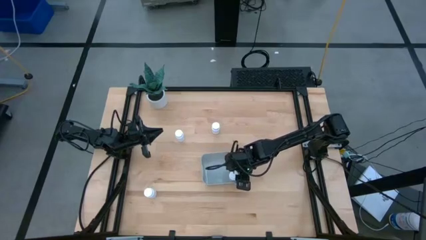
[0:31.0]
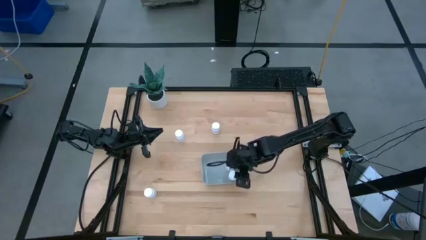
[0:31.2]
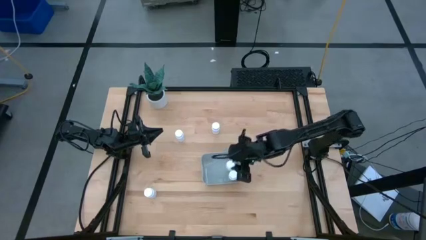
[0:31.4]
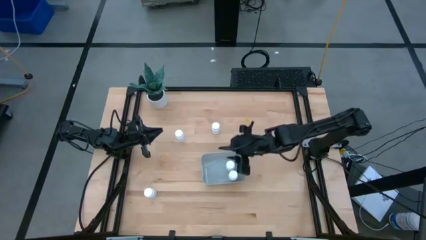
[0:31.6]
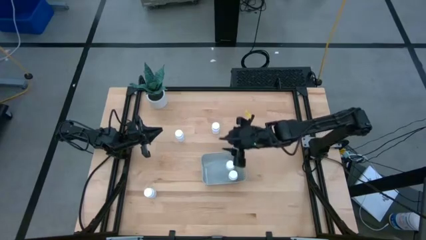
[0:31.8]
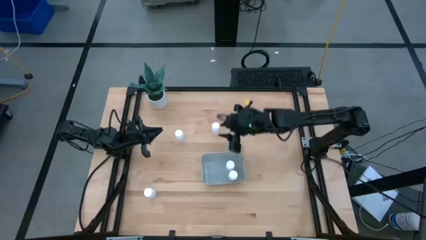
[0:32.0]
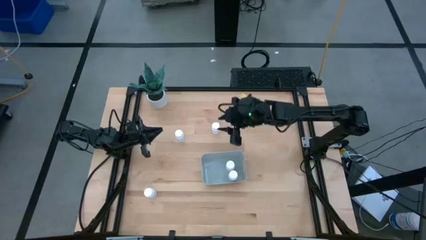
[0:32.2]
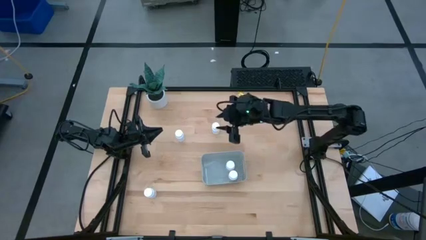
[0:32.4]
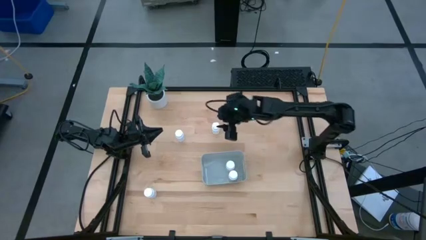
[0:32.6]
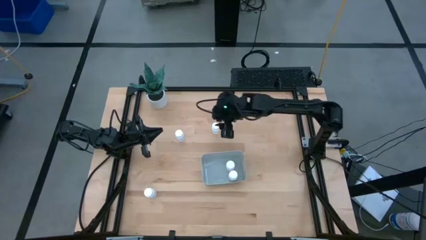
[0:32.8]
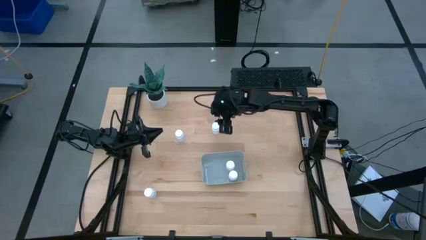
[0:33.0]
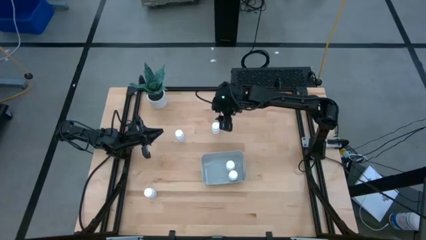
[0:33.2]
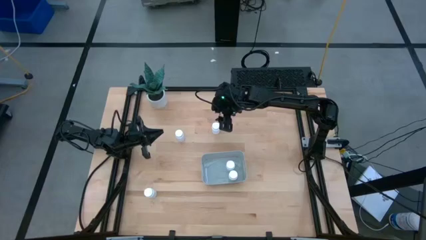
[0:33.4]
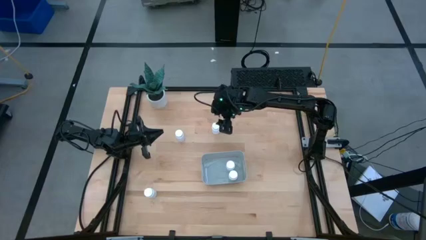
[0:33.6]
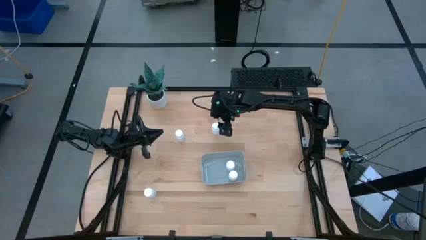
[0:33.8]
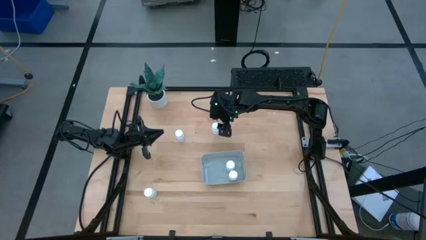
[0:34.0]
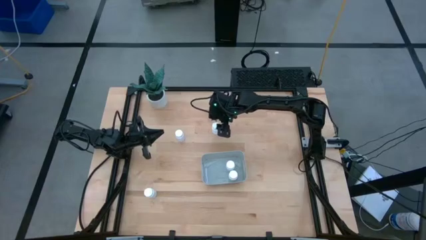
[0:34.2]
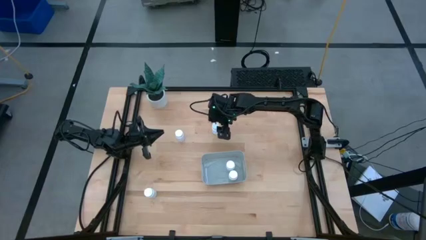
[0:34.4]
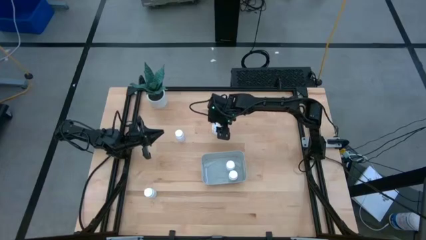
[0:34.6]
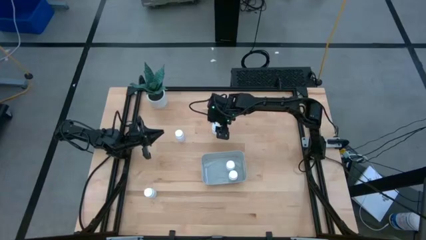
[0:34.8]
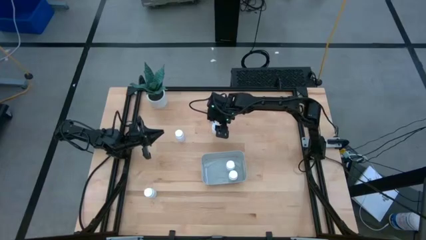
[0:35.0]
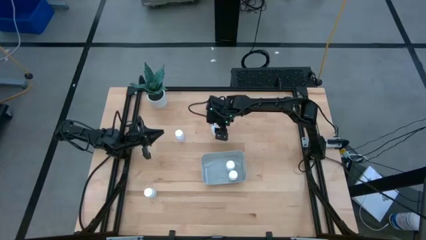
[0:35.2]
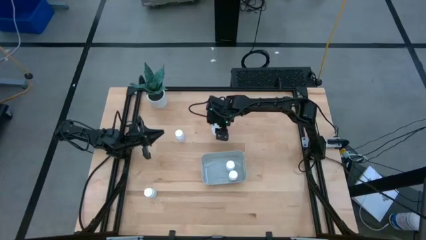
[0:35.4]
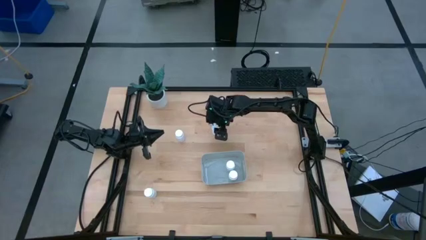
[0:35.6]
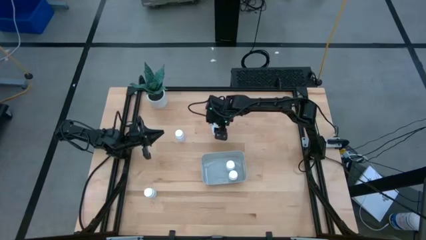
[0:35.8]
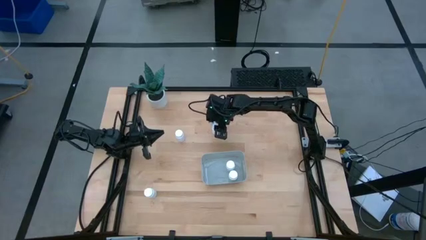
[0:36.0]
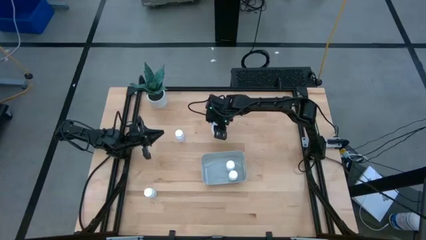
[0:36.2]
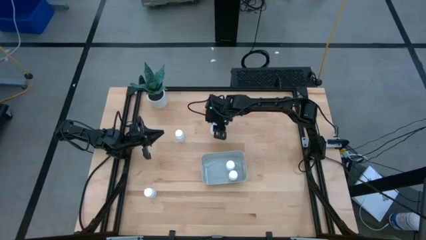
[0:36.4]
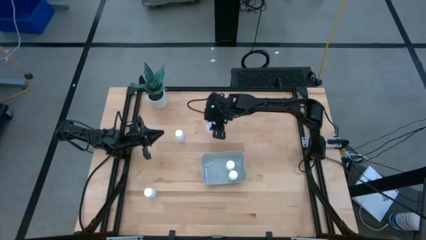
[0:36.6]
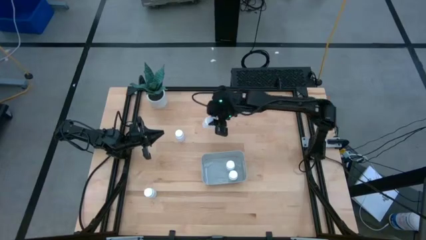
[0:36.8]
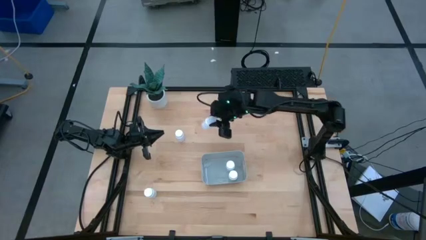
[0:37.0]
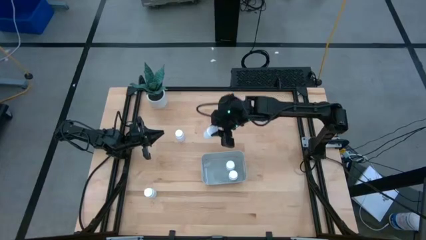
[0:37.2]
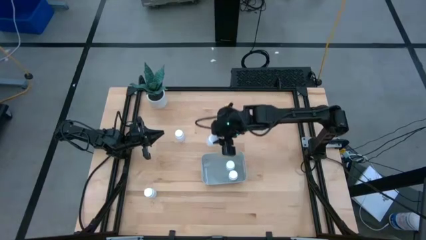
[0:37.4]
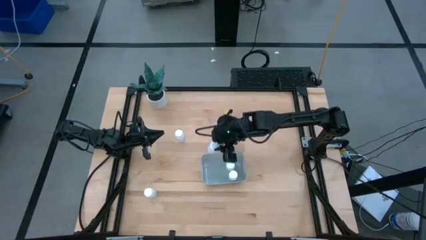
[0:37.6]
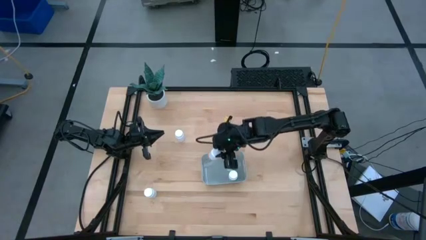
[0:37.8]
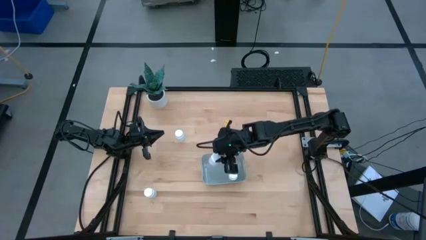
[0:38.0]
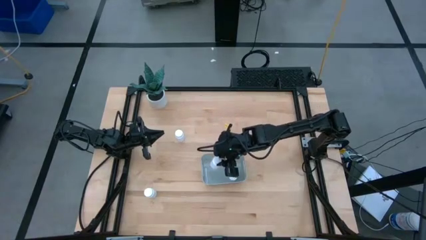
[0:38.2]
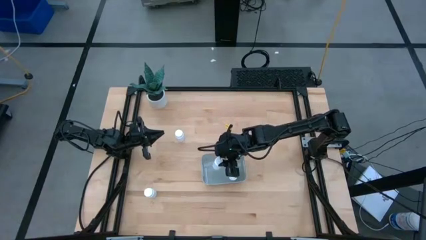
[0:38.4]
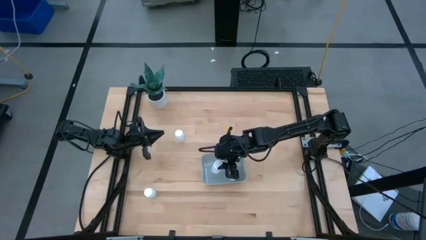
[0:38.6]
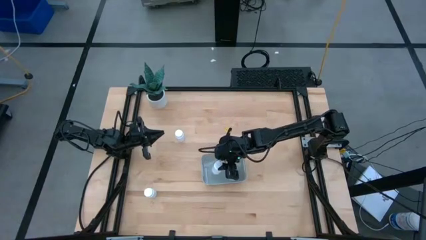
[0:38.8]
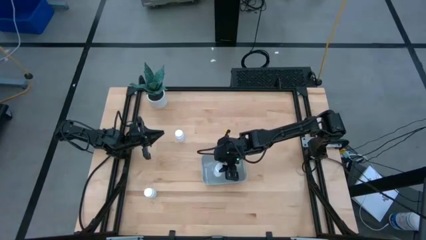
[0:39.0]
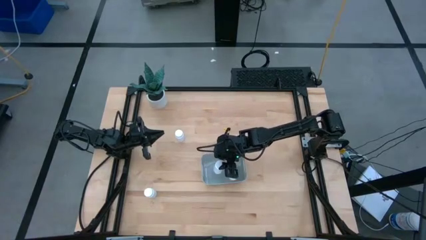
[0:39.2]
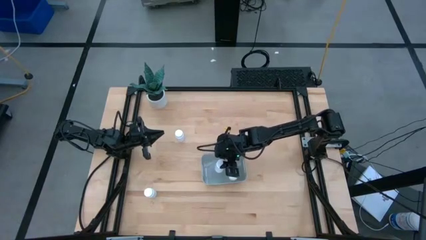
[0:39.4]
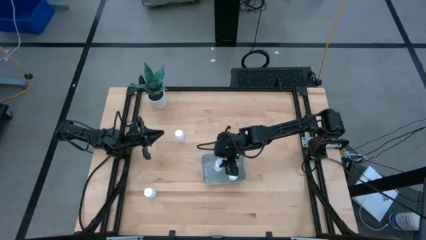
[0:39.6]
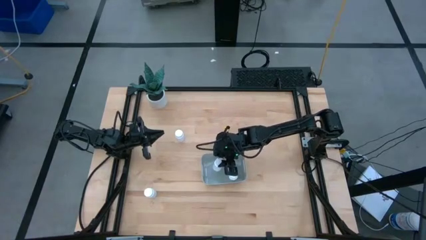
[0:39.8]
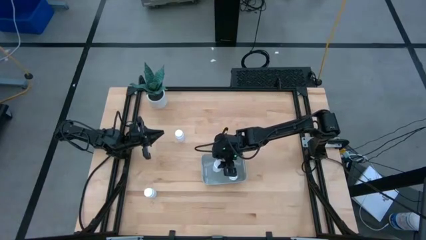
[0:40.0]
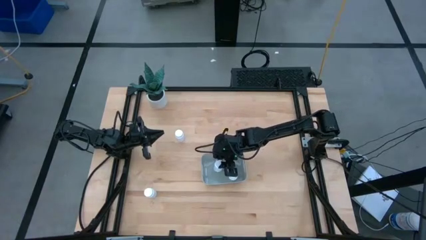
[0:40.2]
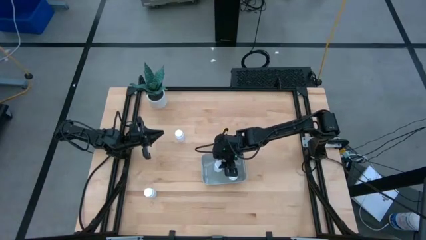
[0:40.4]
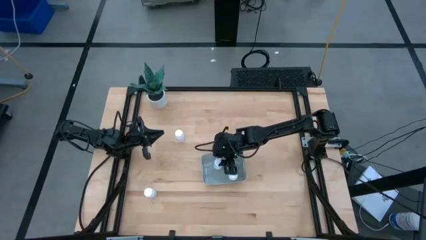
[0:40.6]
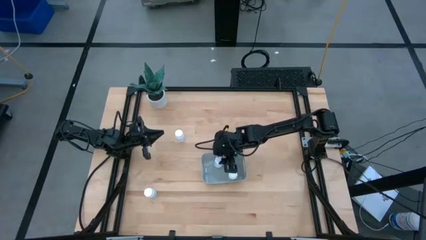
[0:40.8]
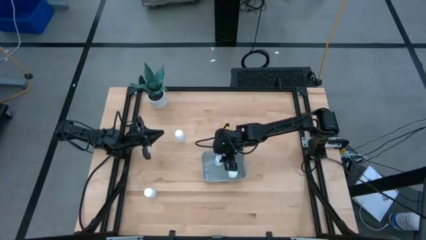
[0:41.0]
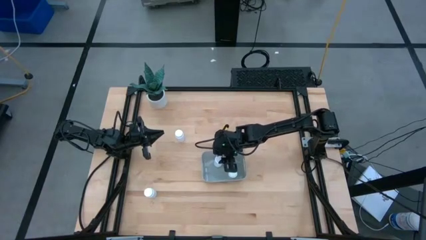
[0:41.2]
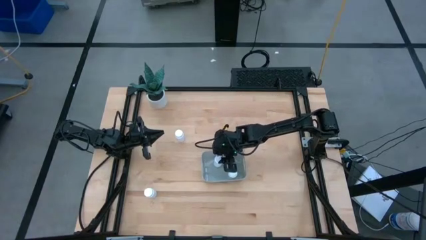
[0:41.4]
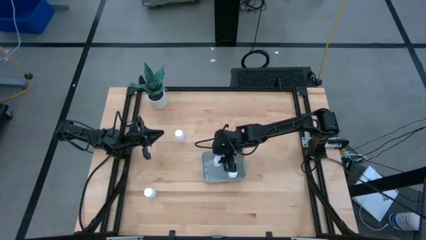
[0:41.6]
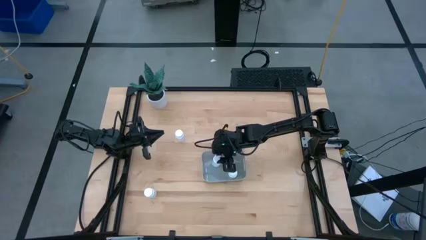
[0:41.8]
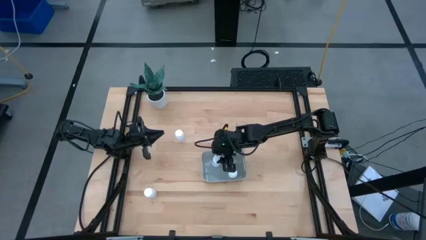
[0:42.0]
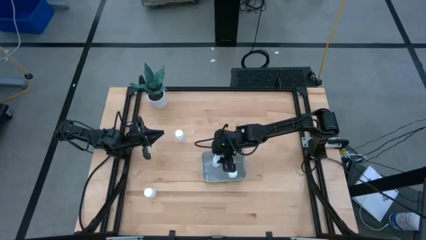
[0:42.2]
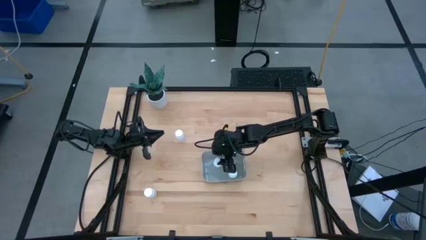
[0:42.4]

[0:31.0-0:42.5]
Task: Pick and place pill bottles into a basket
Put the white pill bottle into the gray bin

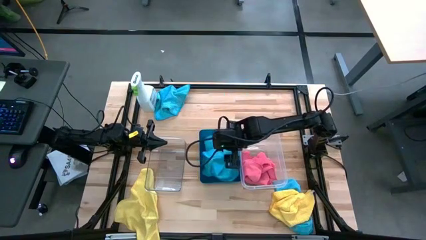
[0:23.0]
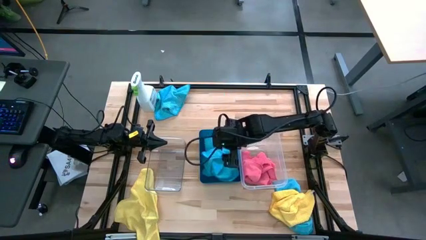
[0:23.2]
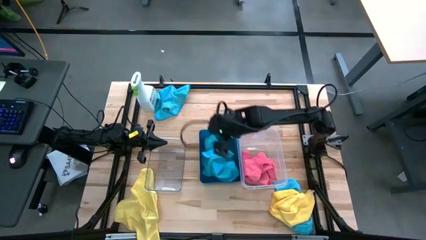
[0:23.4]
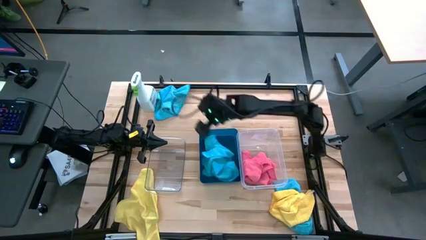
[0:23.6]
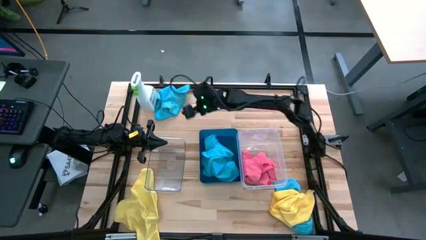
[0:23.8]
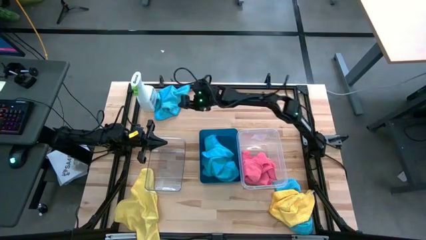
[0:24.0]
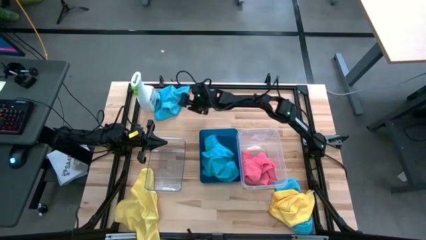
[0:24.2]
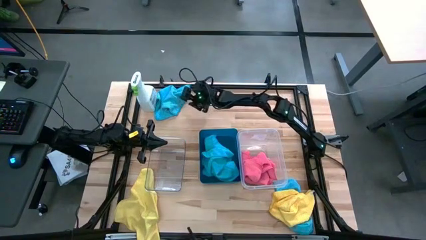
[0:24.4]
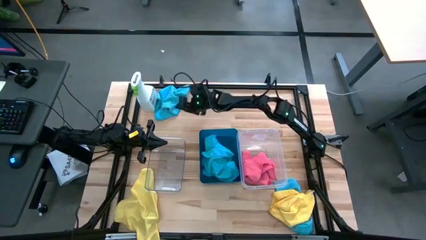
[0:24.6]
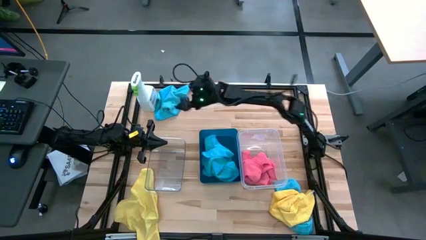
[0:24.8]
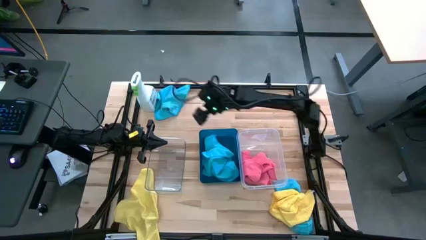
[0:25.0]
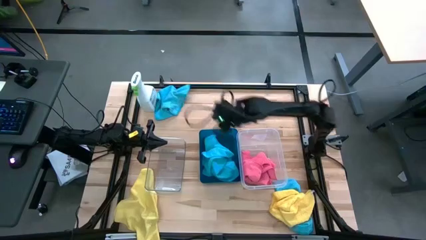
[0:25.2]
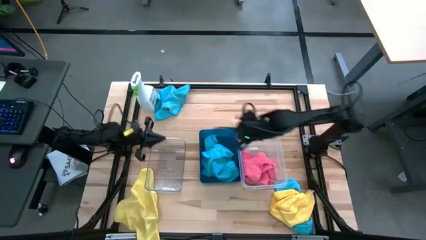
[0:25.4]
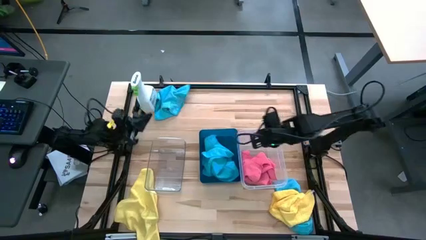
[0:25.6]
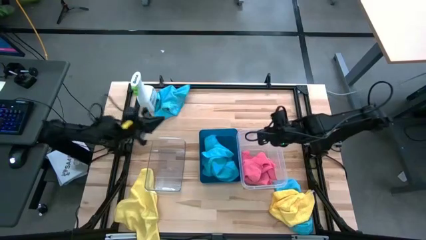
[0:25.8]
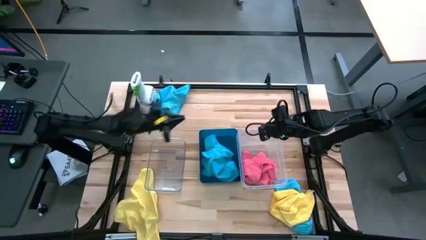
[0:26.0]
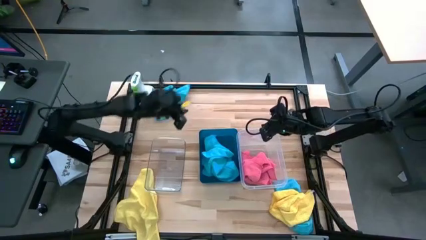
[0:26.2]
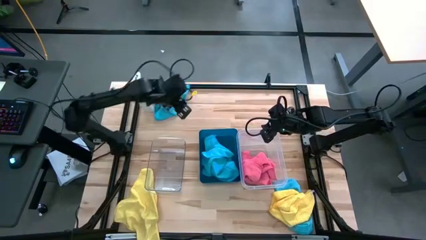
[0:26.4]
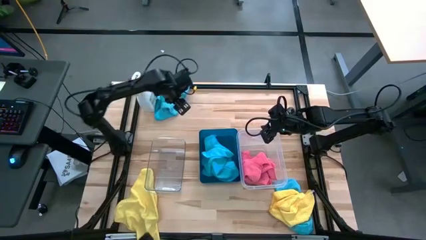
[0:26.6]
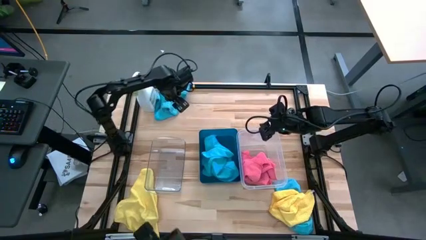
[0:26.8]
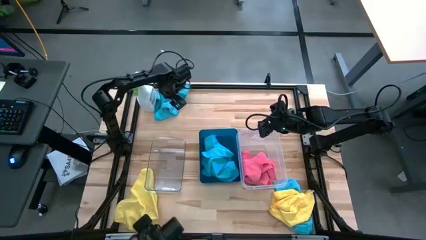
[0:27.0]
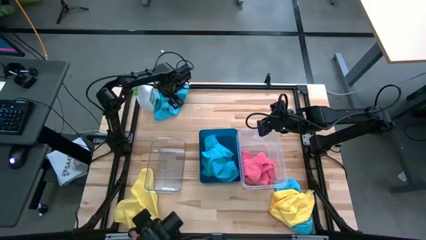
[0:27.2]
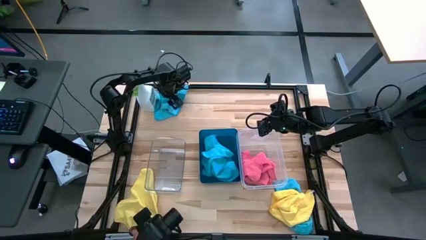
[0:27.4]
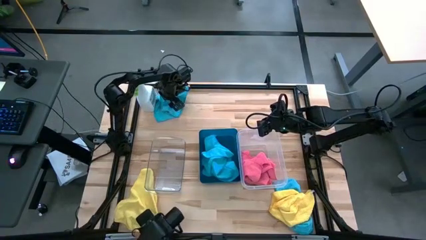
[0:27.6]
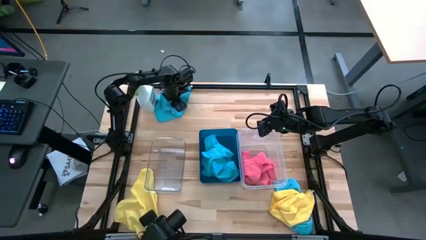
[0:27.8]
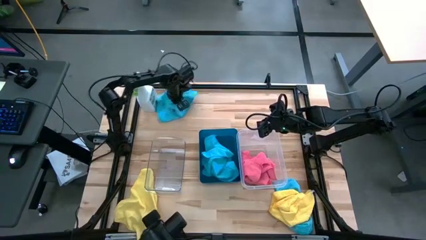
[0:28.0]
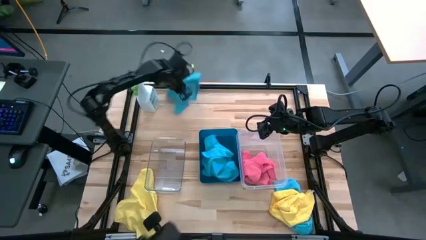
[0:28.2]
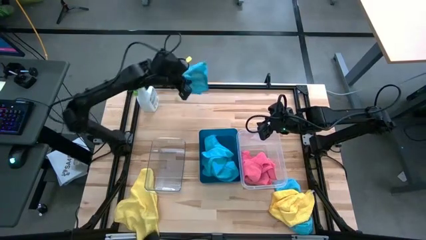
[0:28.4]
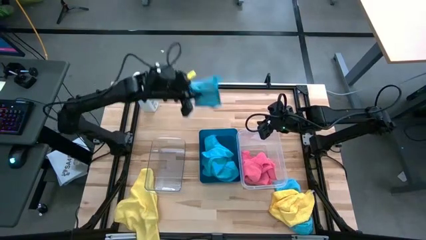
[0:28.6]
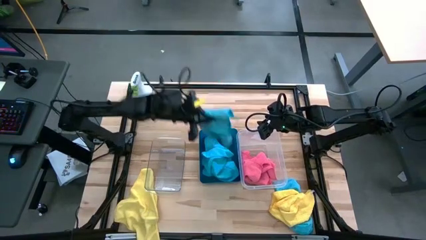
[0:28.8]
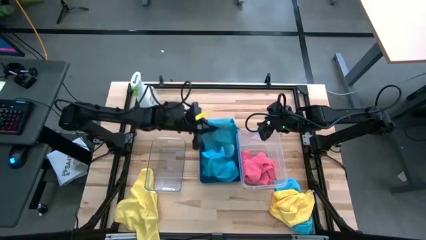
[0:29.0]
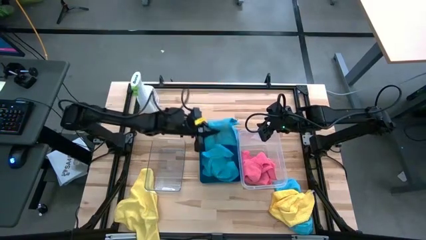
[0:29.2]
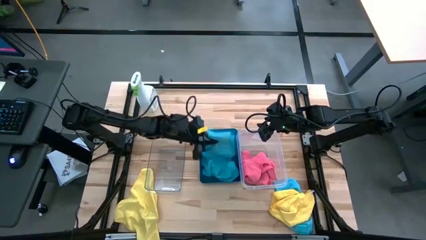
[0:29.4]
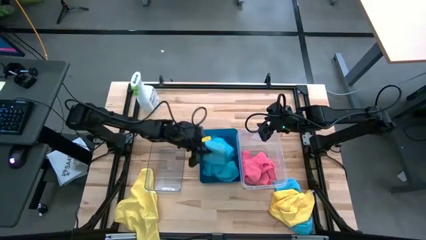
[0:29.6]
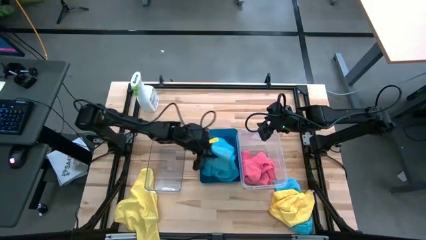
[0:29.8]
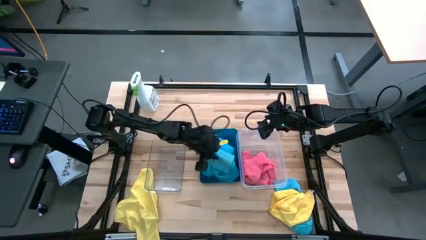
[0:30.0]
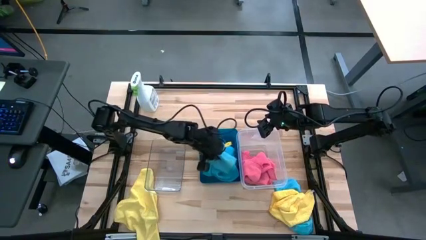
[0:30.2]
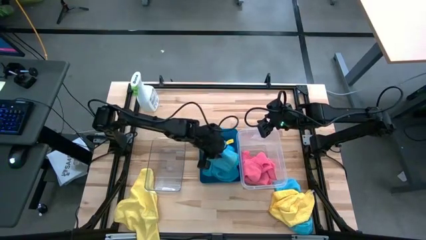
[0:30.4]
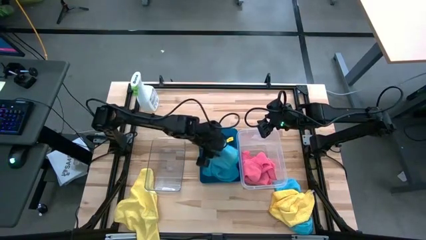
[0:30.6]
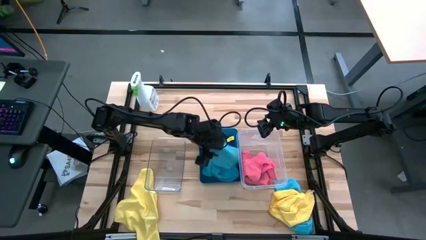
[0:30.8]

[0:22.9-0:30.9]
Task: Sort microfiber towel by color & place in baskets
Put the top blue microfiber cloth into the dark blue bin
